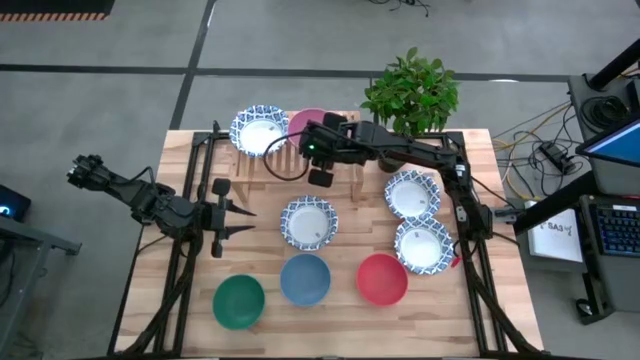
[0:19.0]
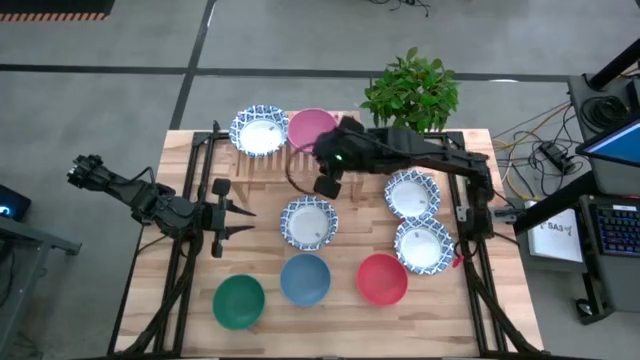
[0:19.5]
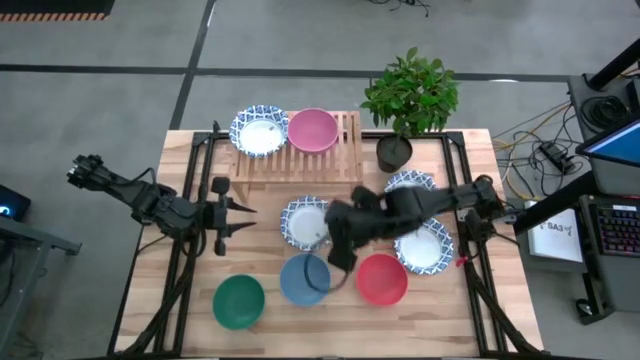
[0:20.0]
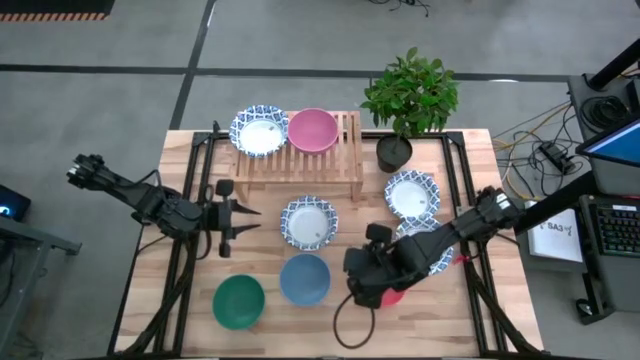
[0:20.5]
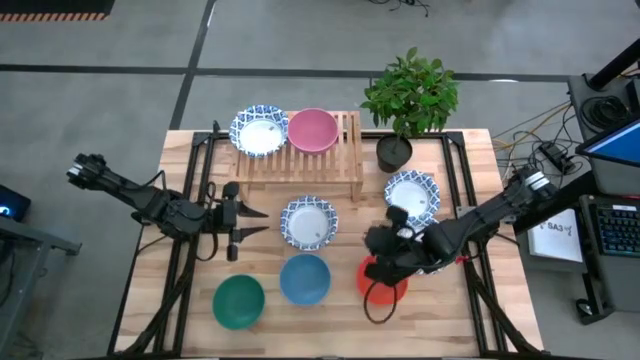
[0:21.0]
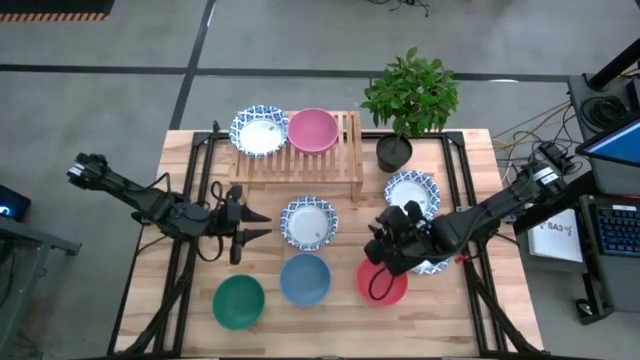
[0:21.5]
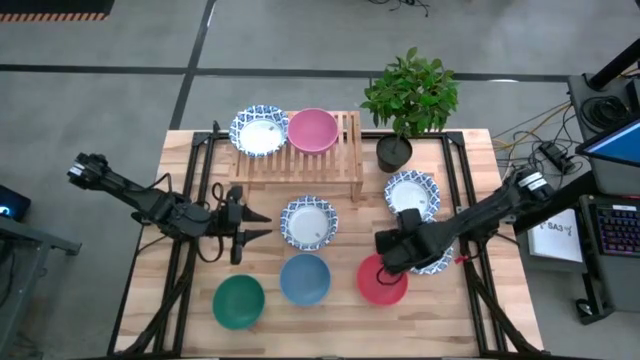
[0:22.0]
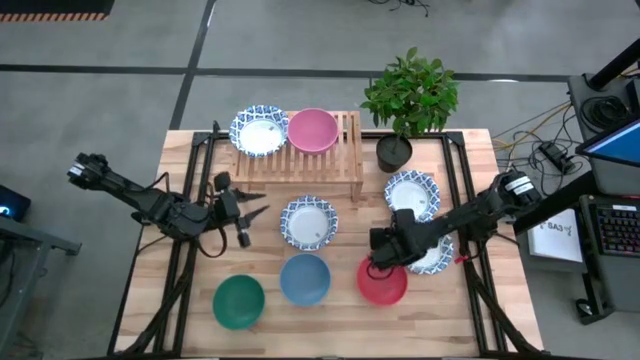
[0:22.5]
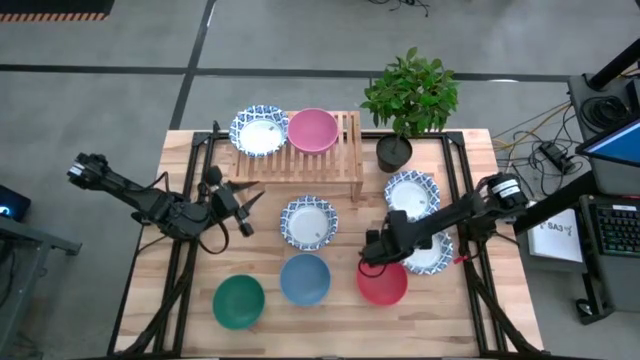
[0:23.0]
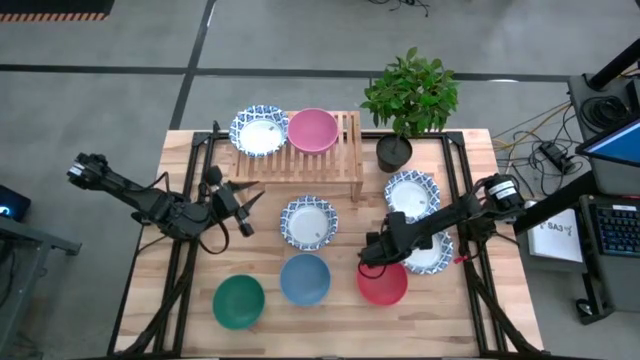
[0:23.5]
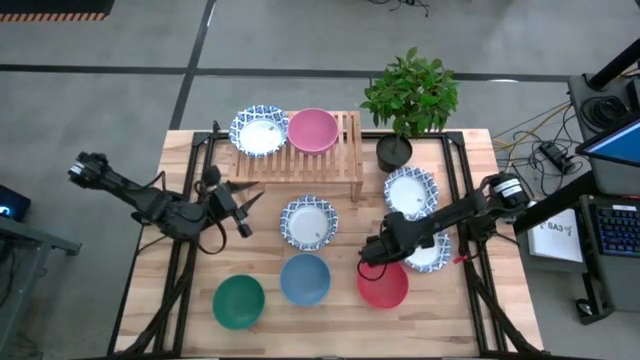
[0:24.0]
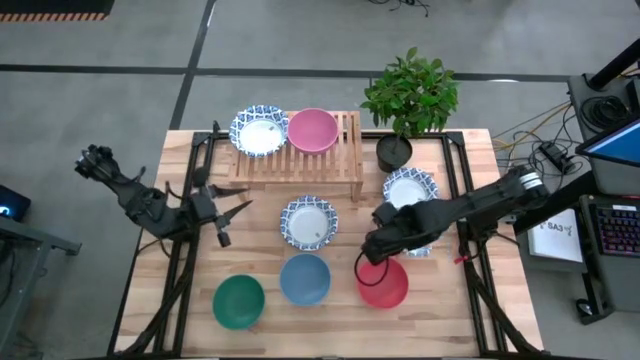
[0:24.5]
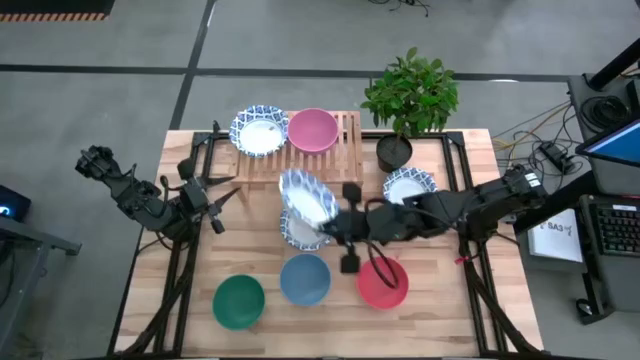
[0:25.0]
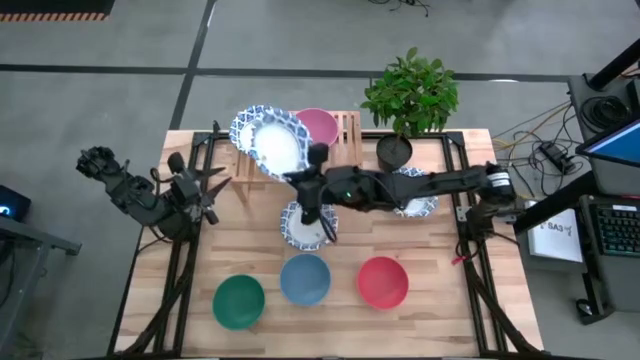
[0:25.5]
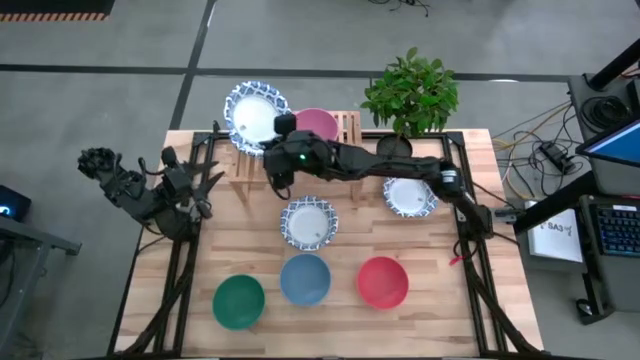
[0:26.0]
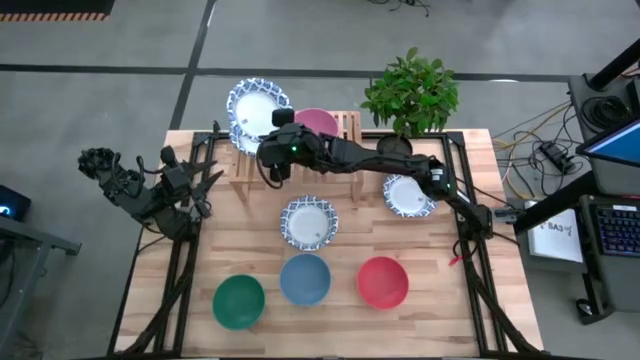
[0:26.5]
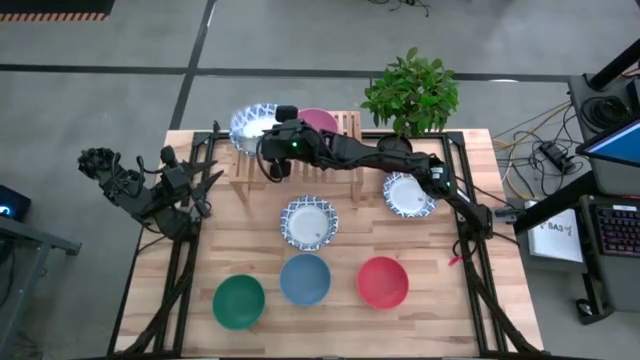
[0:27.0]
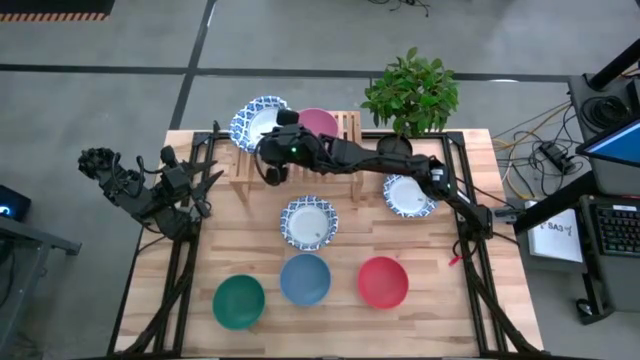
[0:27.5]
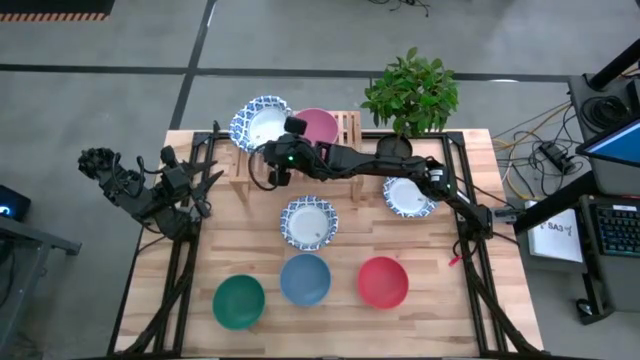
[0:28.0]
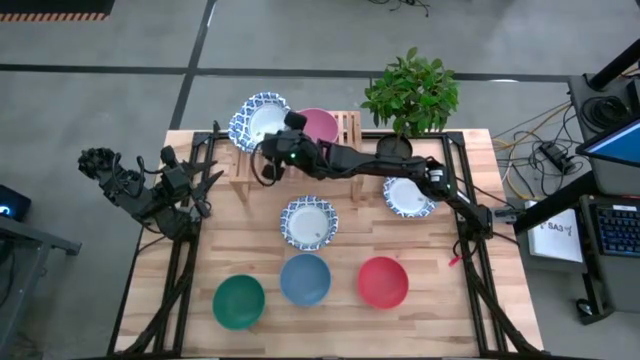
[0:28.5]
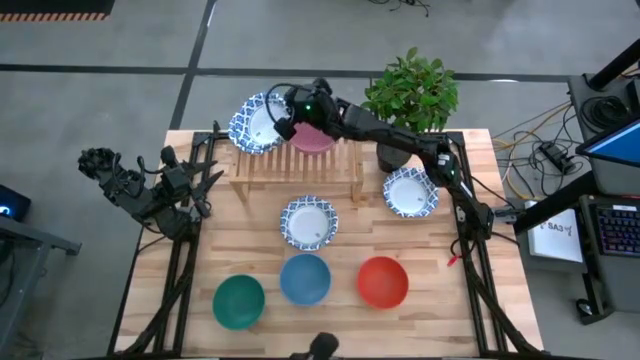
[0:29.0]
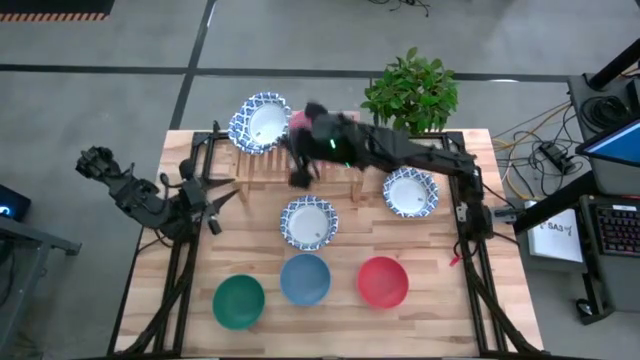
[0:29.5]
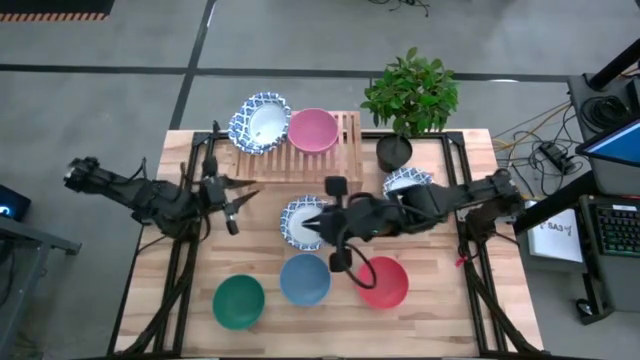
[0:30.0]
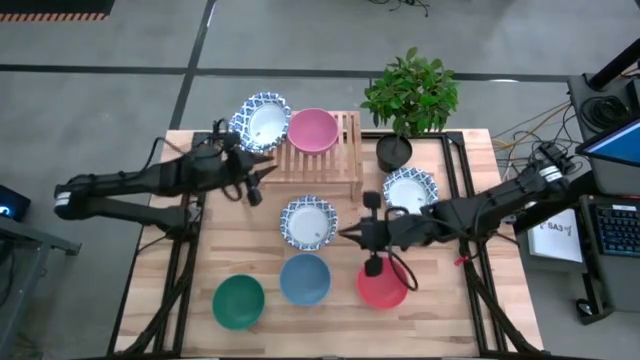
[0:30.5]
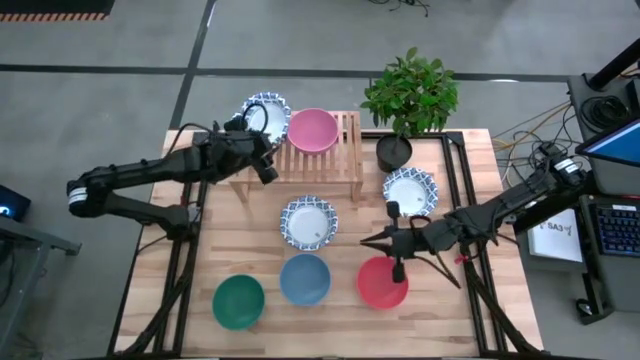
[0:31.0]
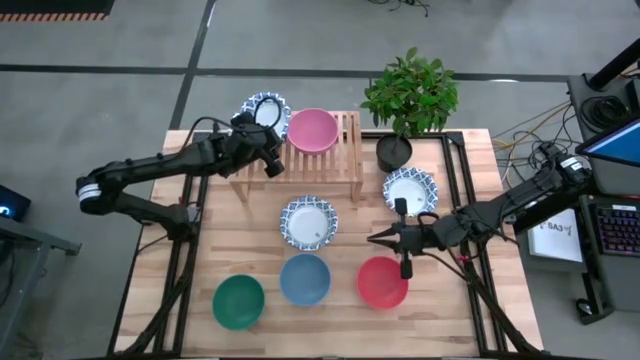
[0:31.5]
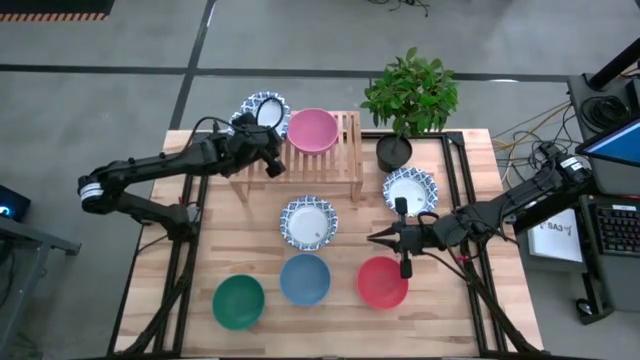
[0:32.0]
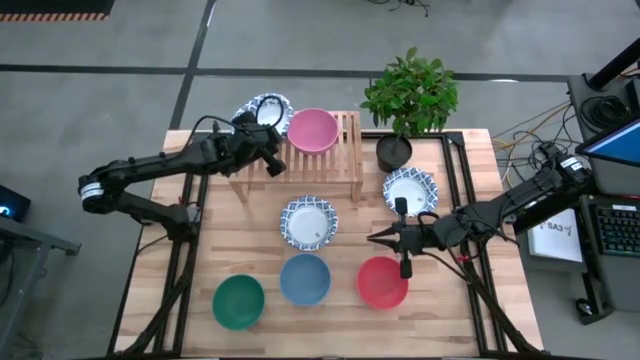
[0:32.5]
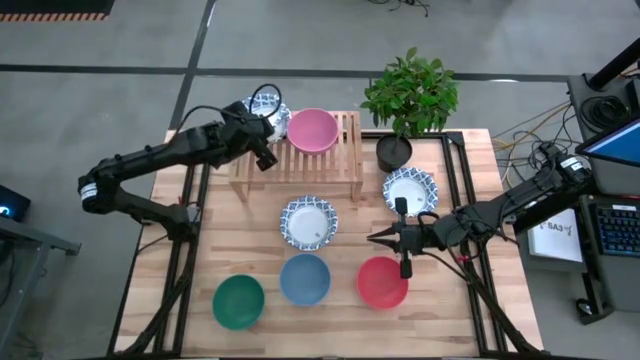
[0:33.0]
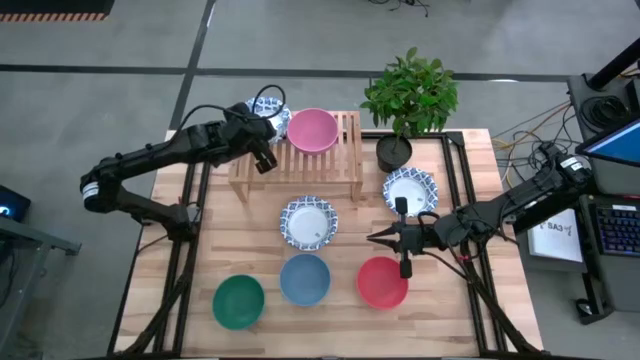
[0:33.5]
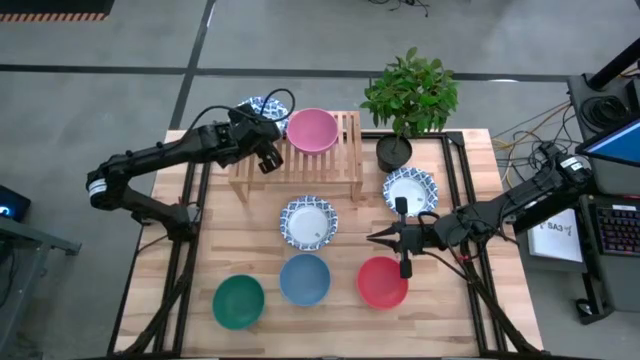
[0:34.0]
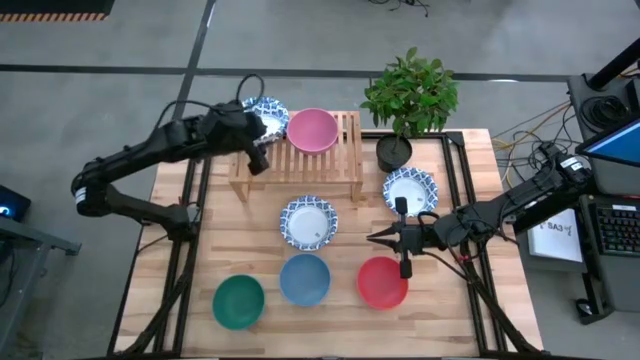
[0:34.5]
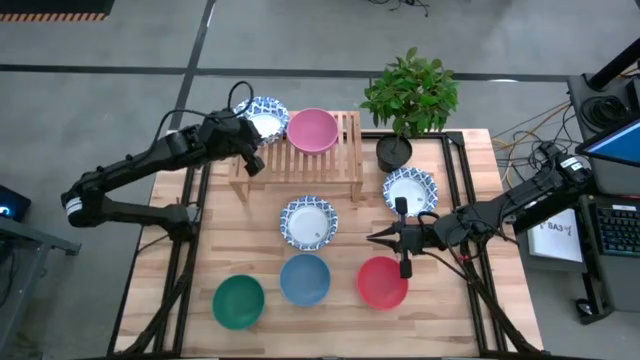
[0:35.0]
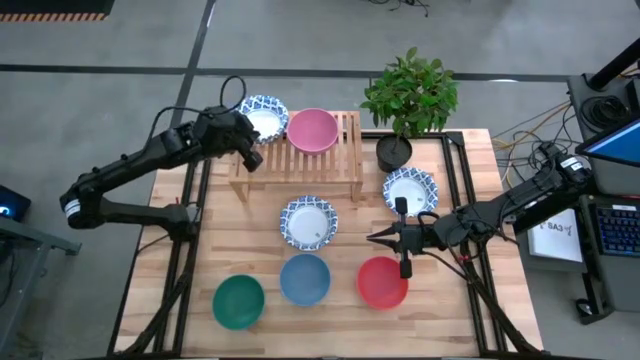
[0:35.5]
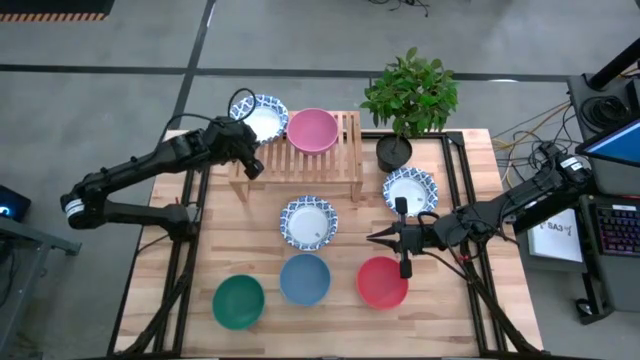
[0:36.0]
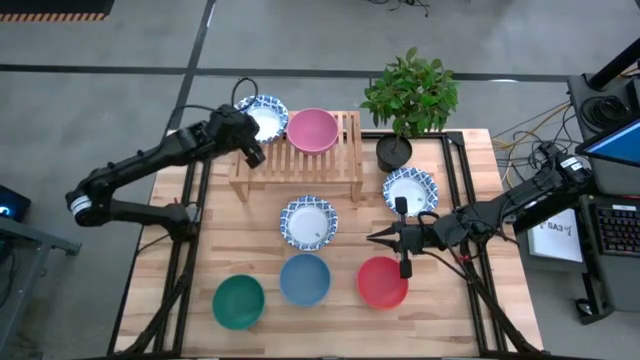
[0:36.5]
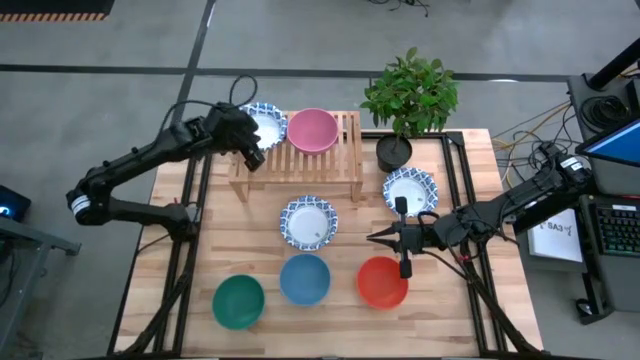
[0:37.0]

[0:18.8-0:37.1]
Task: Place and stack bowls onto a shelf
Stack the white patterned bowl on top of the white patterned bowl on the shelf

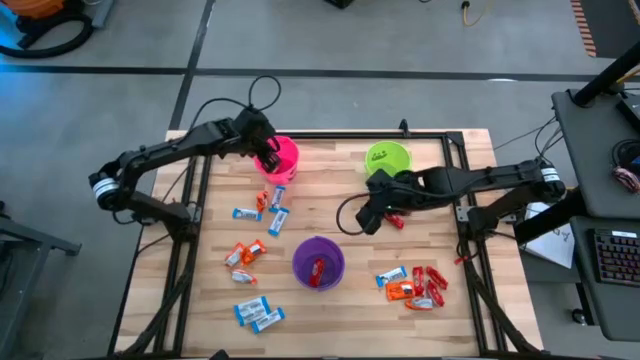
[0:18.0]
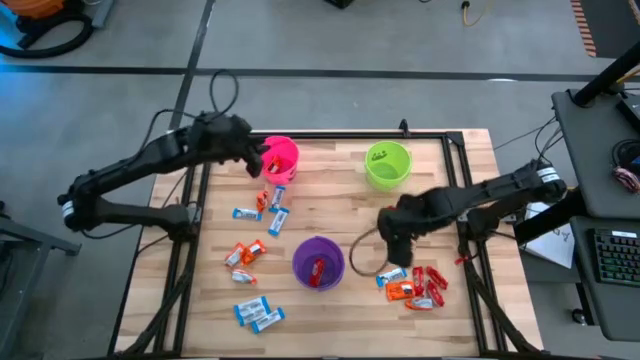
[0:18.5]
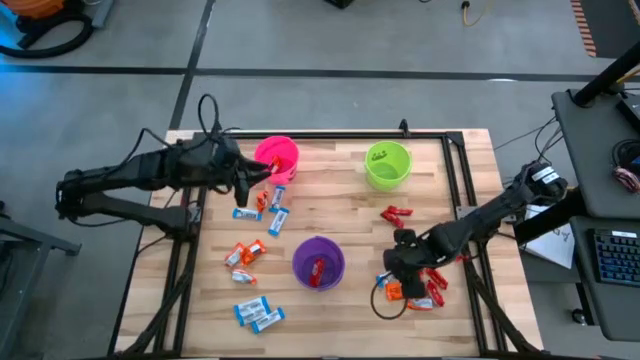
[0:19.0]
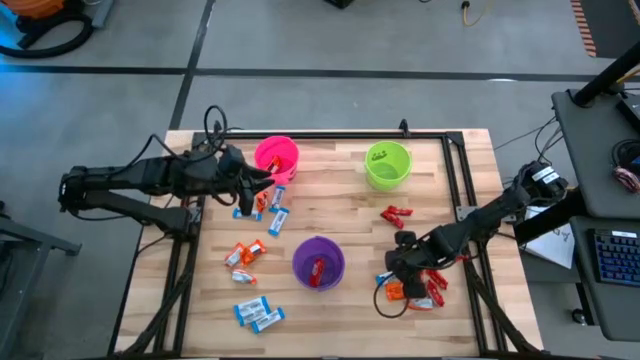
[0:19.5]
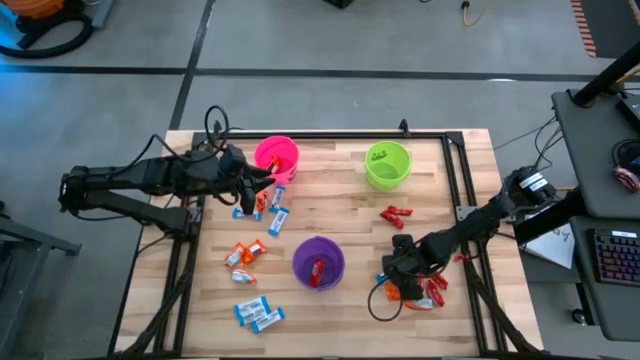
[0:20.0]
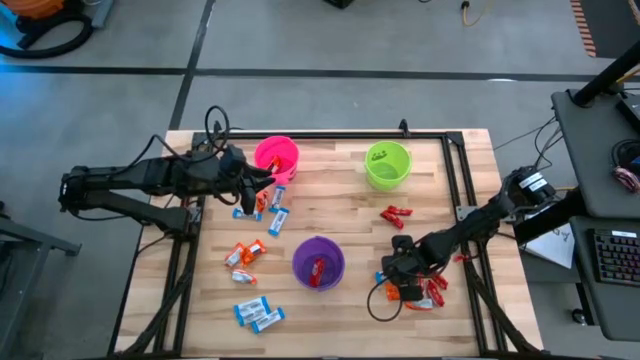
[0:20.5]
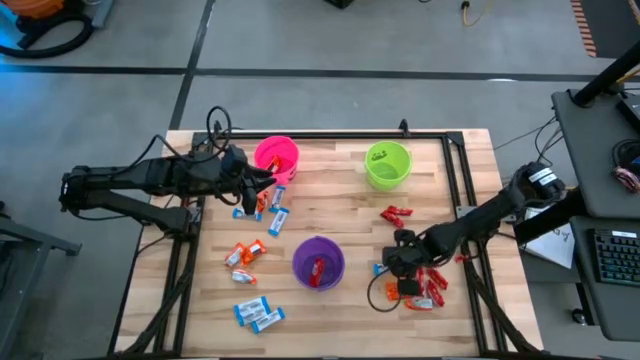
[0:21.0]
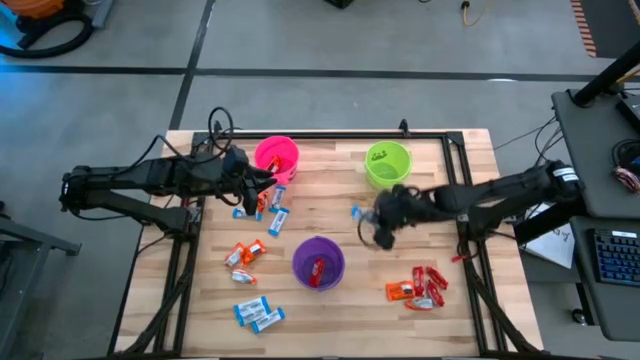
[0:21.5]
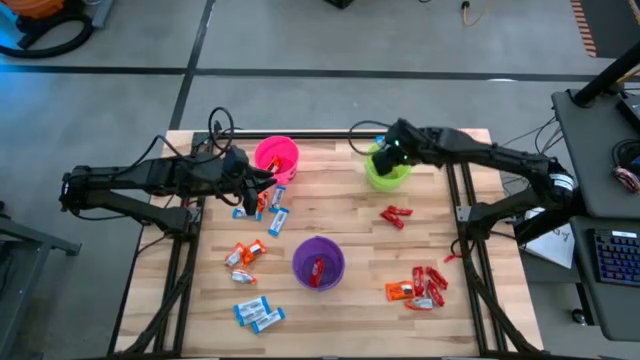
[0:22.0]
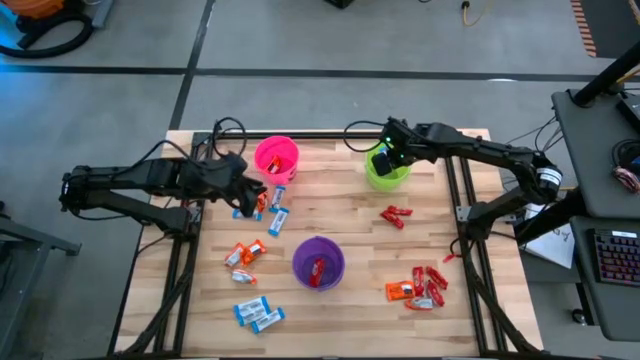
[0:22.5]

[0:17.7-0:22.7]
Task: Sort candy
Put the white-blue chocolate into the green bucket
